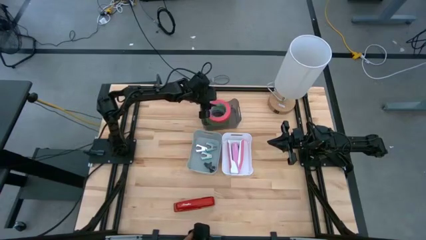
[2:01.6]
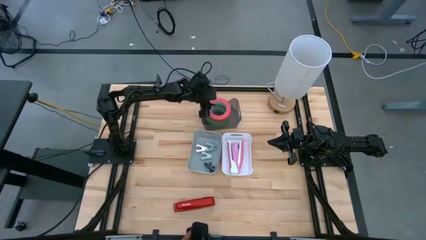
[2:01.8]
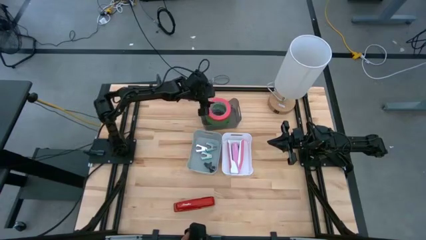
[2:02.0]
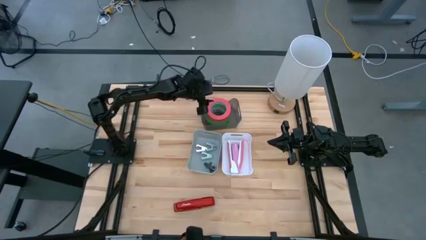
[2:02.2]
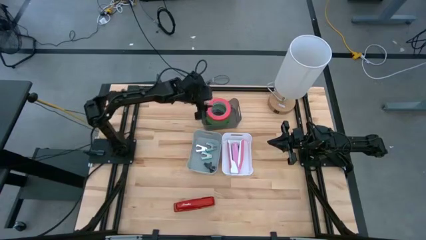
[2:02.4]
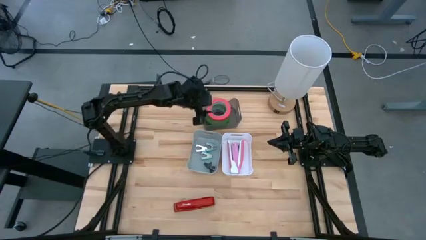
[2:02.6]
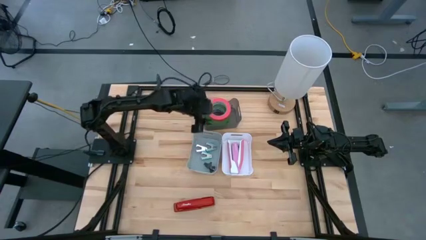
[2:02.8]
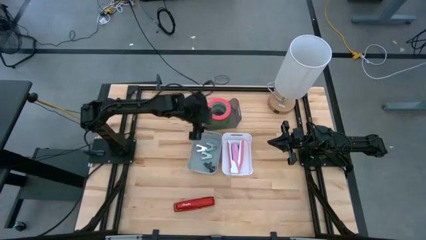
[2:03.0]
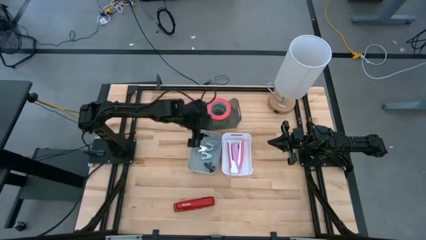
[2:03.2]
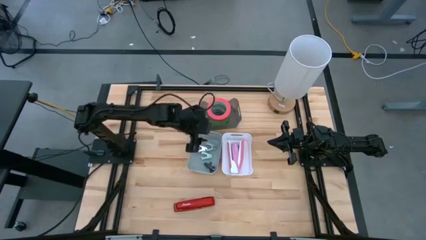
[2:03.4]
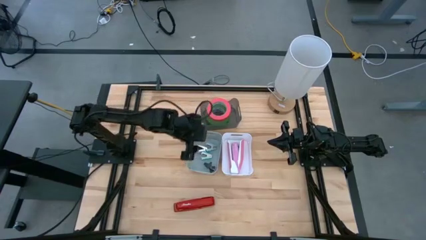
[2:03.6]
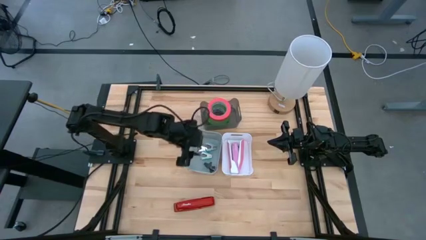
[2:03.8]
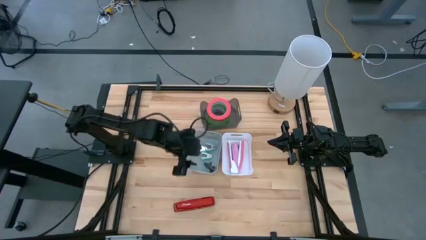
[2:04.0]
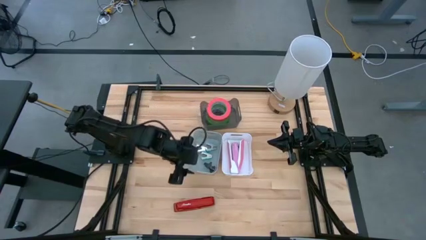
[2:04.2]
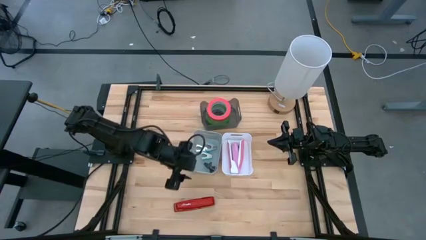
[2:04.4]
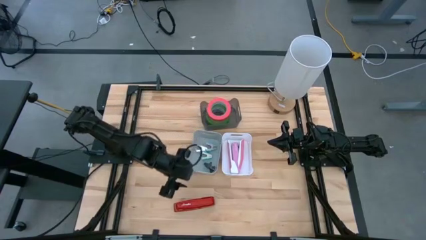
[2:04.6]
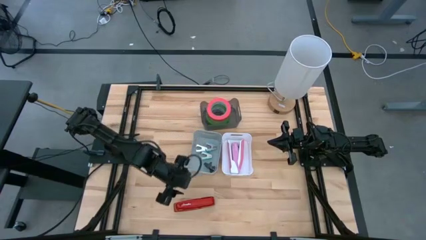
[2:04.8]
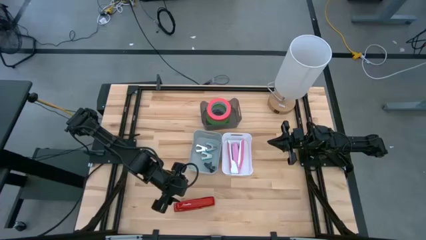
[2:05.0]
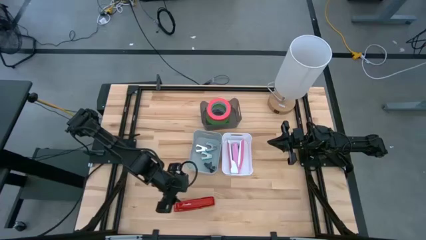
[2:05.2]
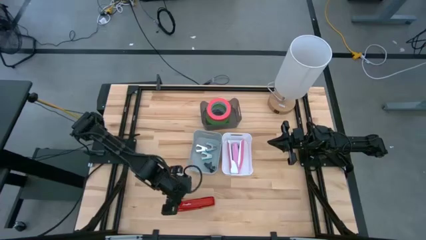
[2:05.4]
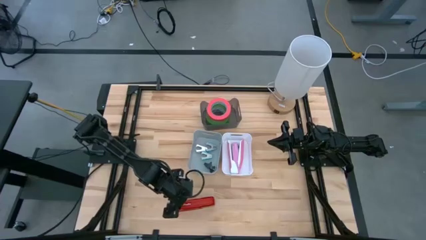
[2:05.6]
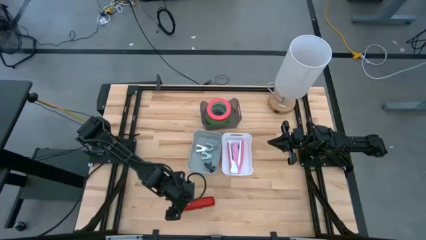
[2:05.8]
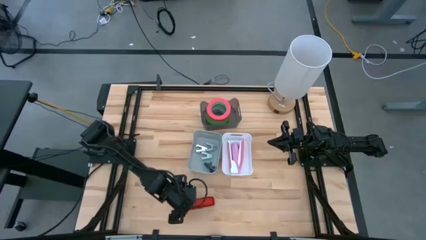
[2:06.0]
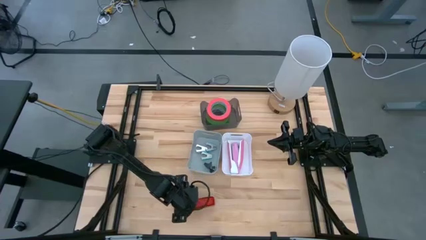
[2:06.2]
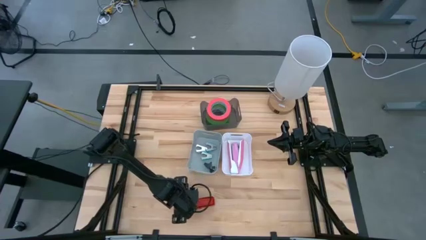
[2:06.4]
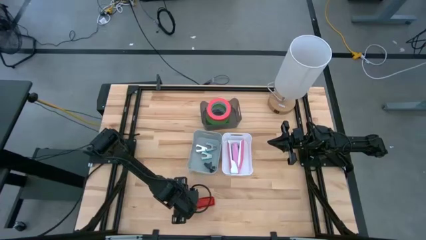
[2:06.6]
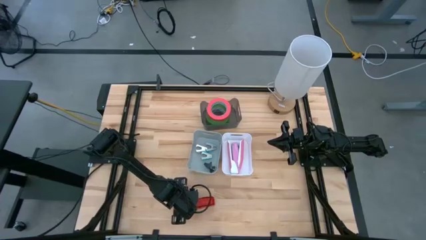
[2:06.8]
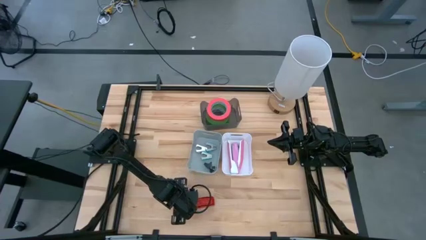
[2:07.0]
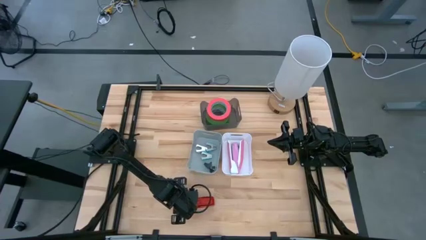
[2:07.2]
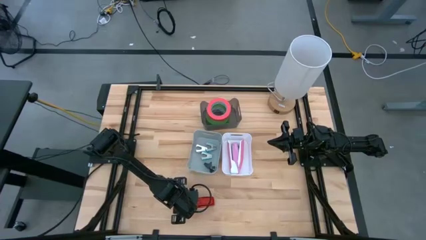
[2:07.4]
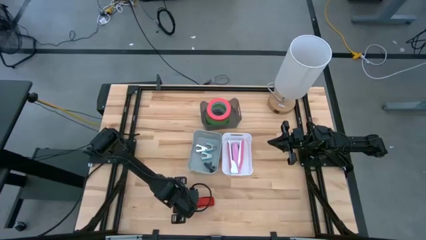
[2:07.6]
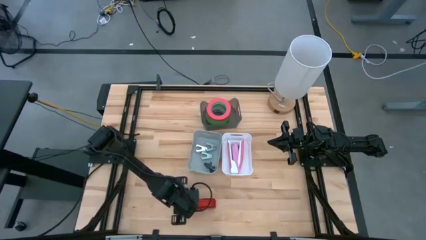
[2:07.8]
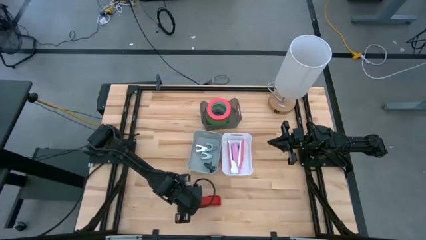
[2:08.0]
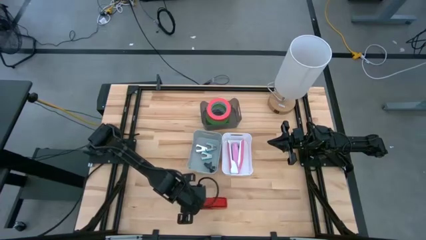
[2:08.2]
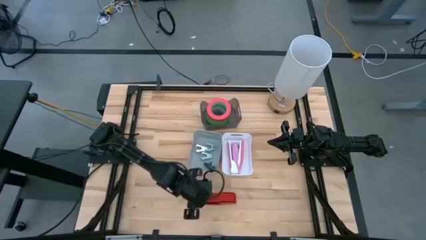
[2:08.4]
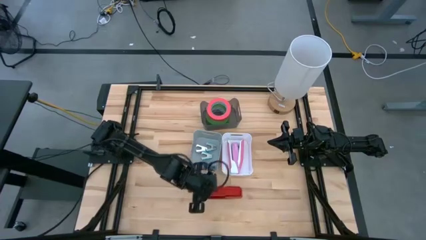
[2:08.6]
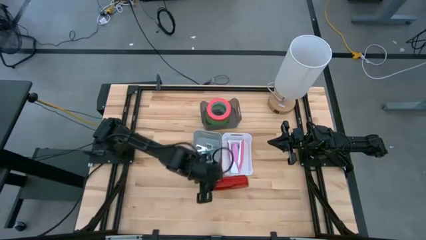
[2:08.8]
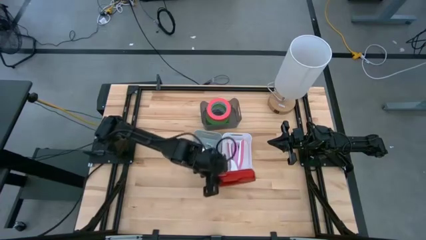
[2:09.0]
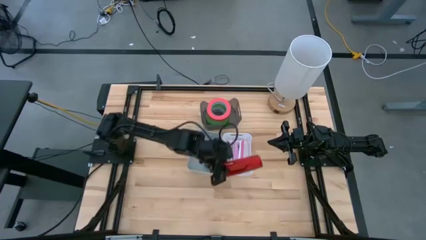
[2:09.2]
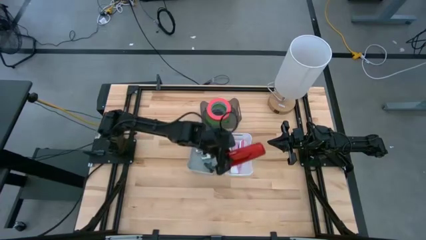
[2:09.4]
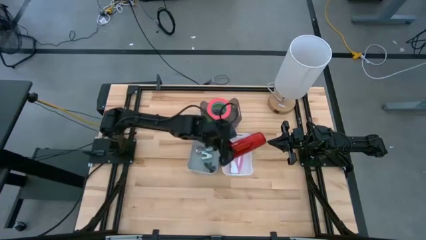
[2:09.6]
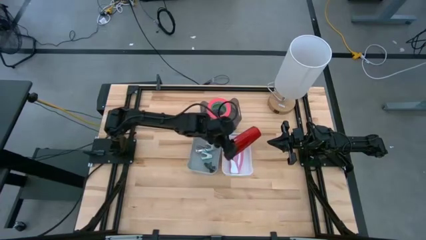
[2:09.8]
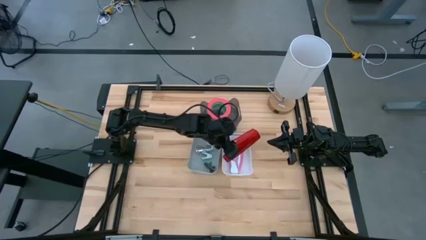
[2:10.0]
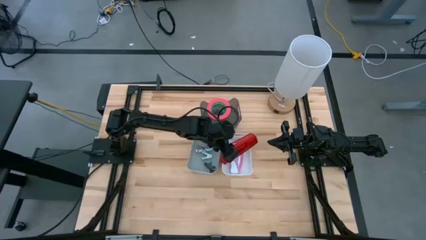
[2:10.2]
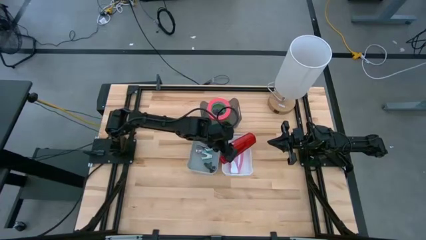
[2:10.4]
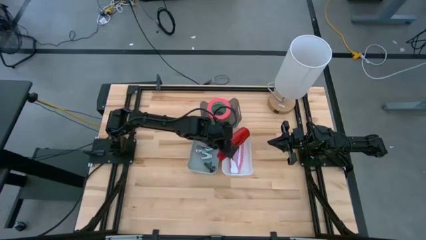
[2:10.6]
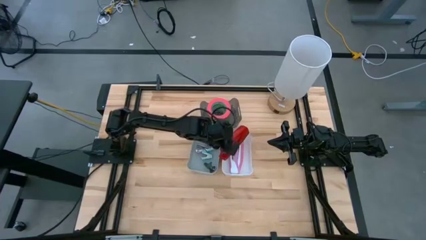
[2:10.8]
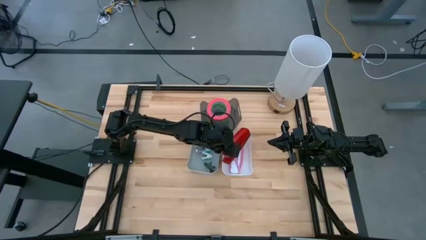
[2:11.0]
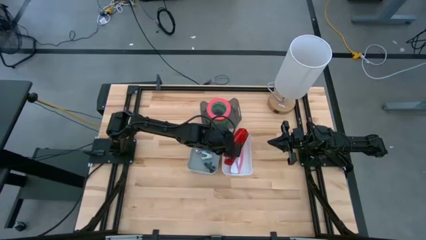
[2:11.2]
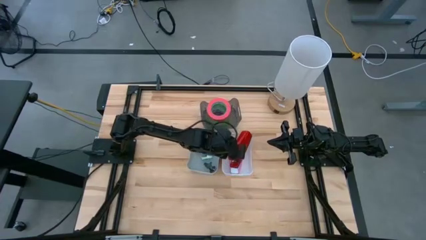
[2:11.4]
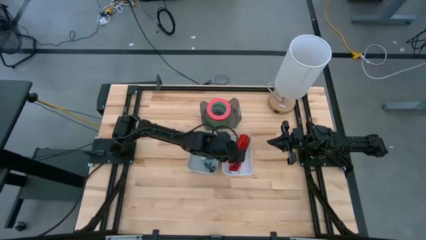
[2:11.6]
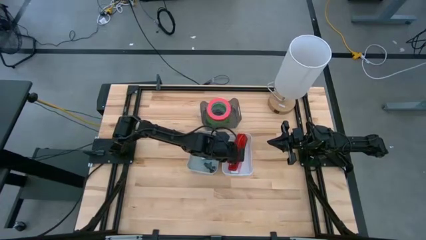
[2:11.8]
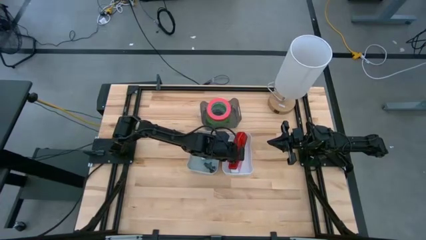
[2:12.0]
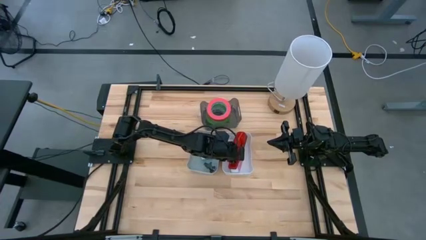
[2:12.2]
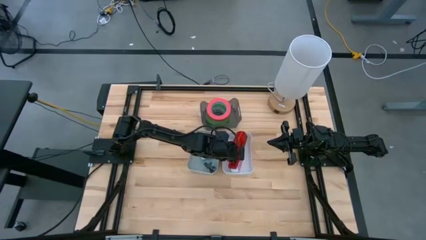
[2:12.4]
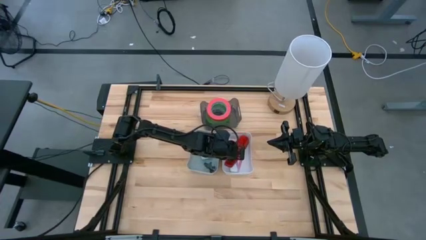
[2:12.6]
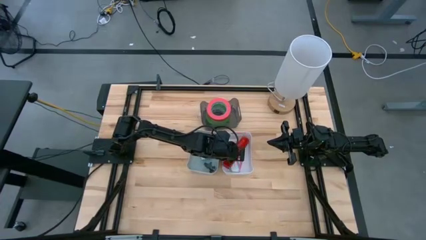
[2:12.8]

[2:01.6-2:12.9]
Task: Pick and place Stapler, Stapler remover, tape
Put the red stapler in the white bin
